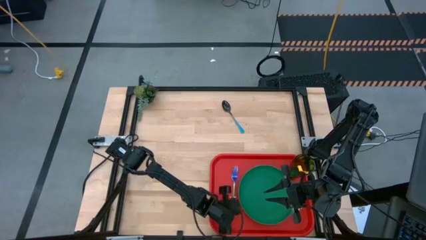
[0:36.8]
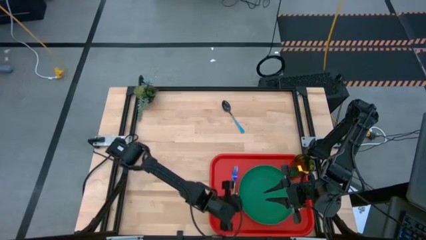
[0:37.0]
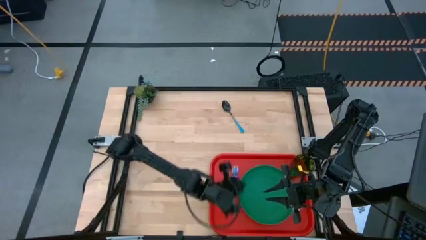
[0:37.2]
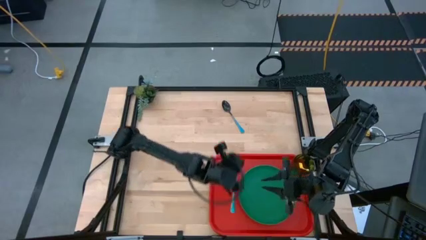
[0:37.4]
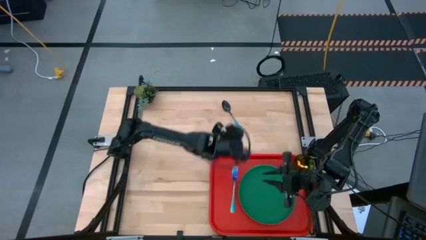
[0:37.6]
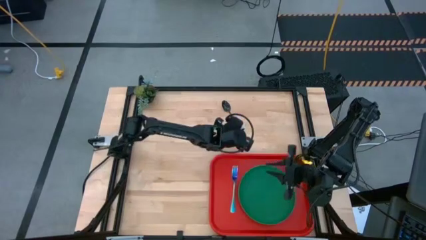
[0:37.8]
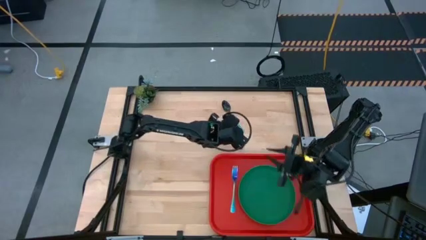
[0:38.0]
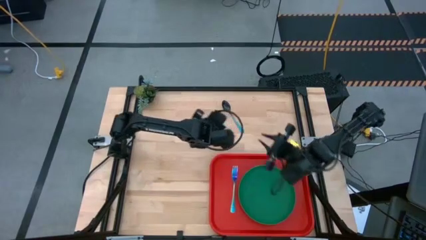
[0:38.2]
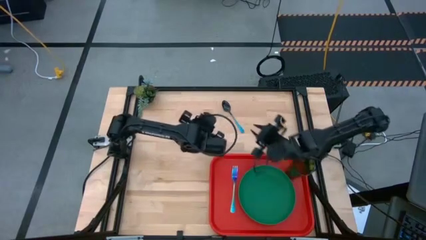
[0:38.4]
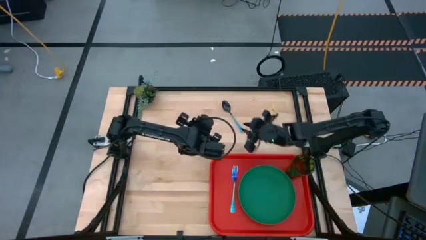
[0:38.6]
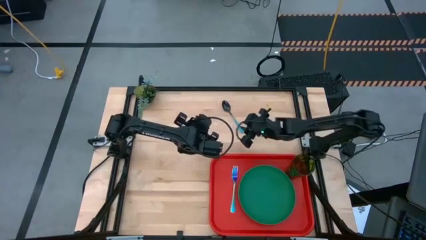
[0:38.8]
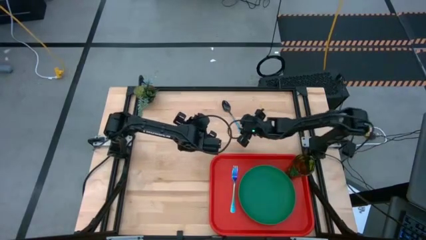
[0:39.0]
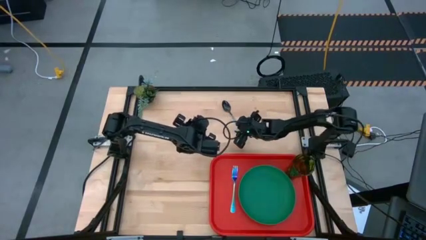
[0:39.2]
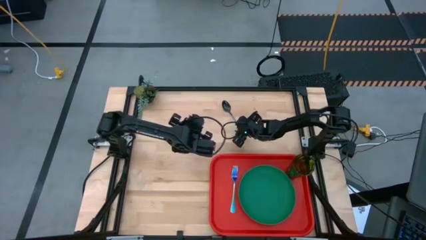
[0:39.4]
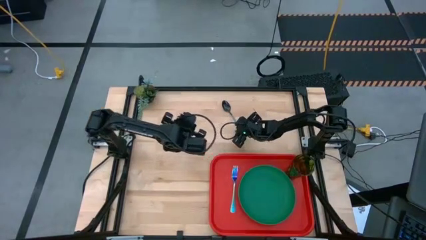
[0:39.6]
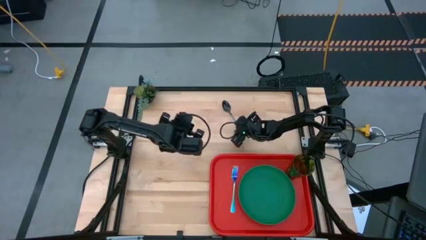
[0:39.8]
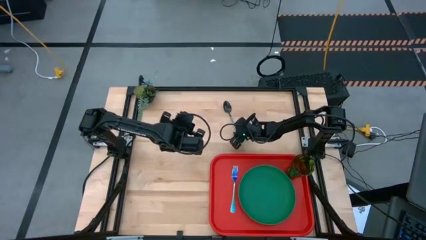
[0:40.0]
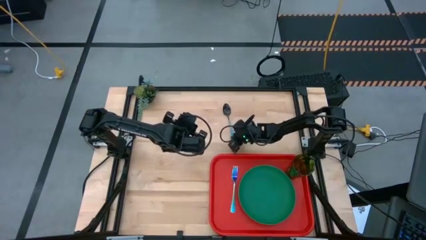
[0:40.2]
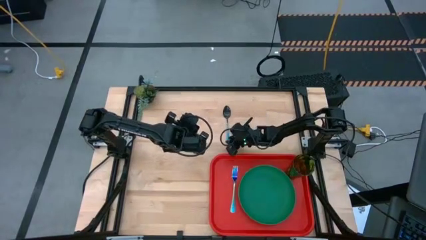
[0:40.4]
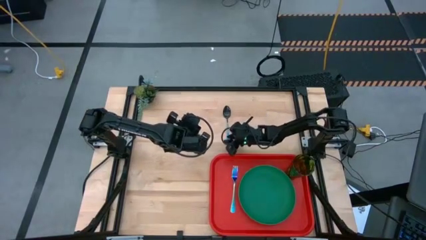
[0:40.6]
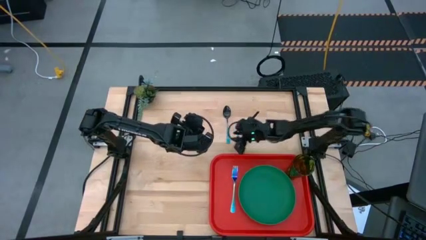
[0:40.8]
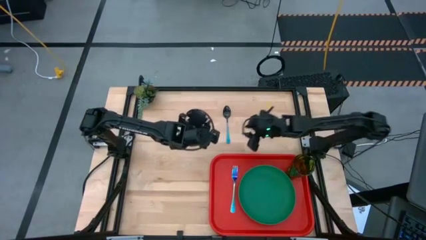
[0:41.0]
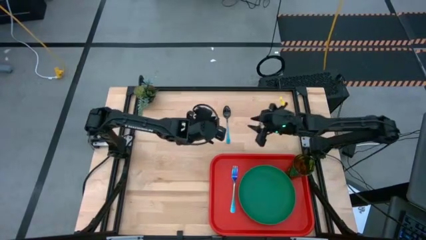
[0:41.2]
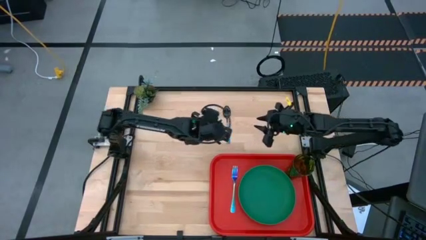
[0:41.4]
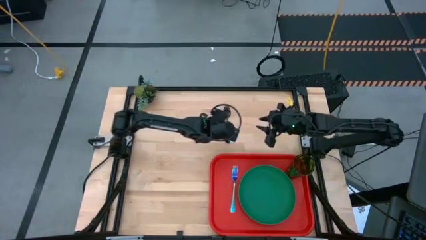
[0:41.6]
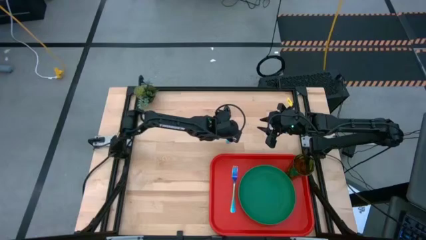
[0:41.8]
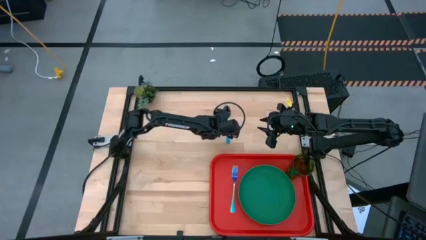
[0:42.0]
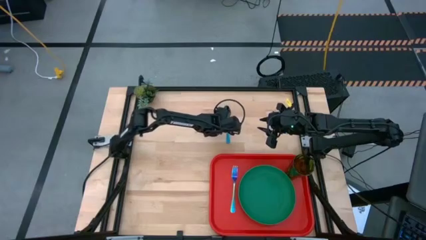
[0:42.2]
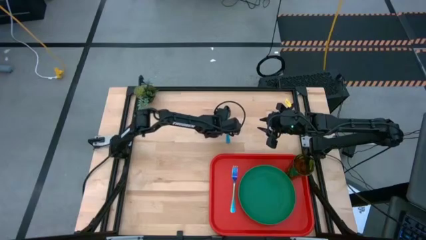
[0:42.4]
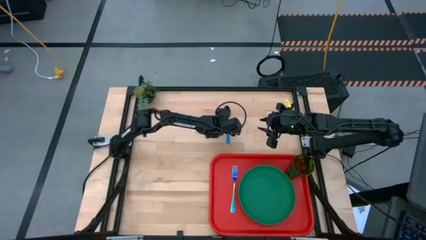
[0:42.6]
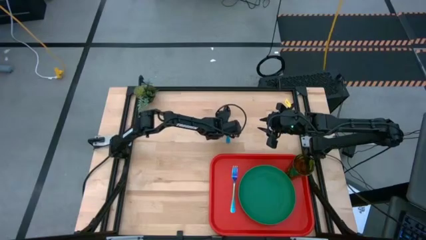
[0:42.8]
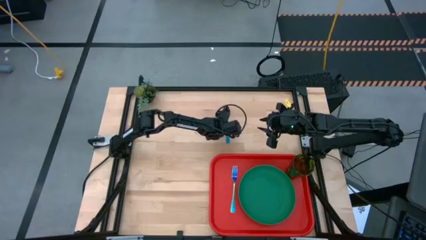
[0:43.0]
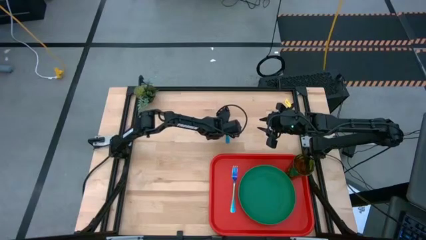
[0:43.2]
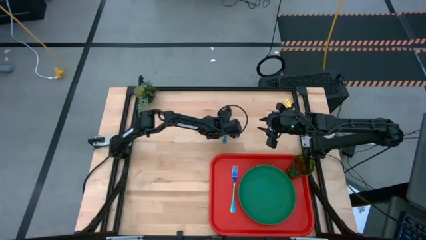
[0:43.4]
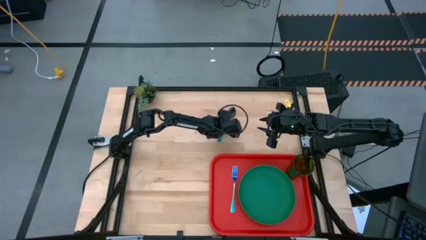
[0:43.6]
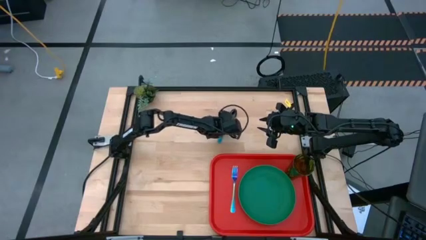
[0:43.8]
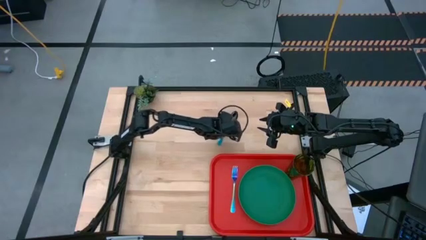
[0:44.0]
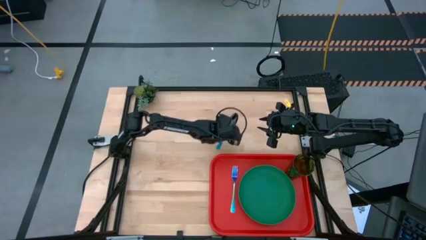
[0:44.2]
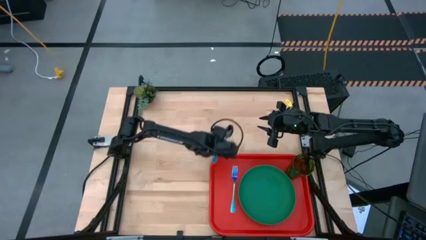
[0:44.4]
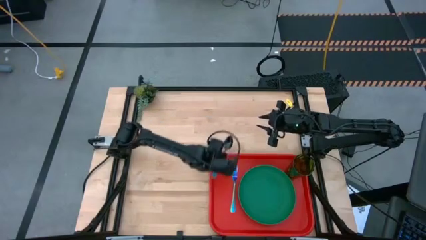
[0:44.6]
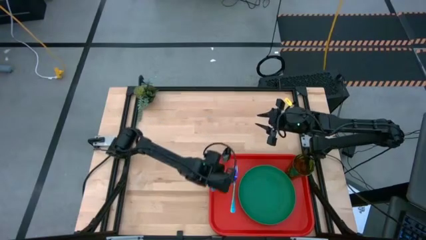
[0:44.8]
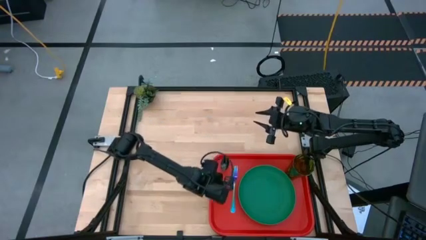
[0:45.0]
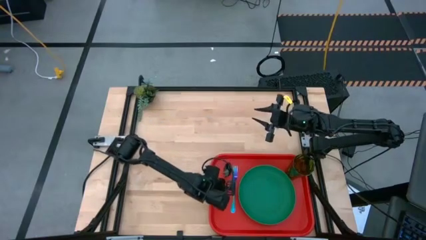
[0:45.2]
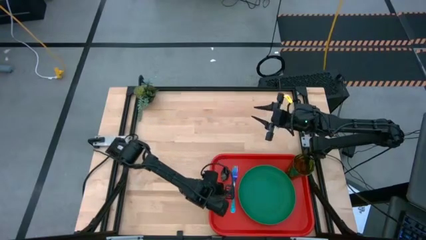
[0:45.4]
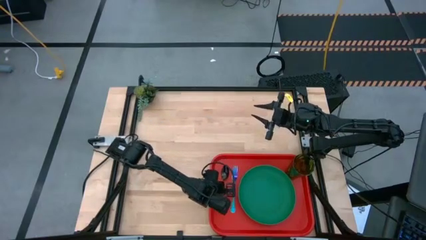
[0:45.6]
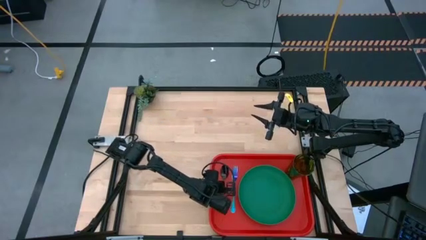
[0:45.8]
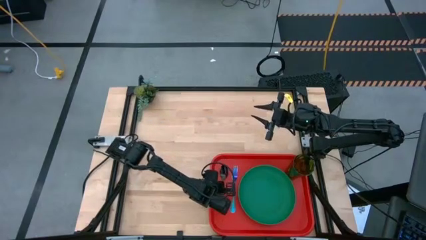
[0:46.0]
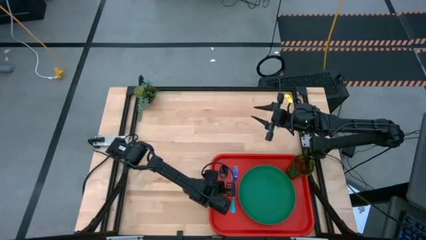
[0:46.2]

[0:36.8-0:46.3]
Task: Pick and place plate/cup/fork/spoon on tray
Put the blue spoon on the red tray to the left of the purple fork

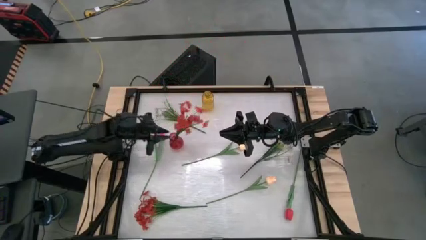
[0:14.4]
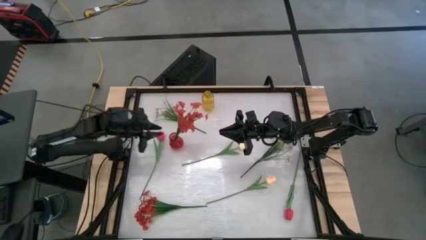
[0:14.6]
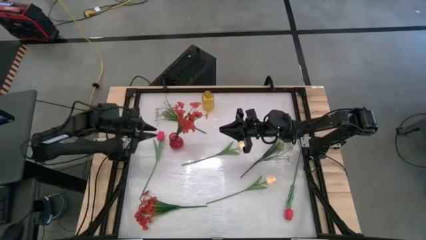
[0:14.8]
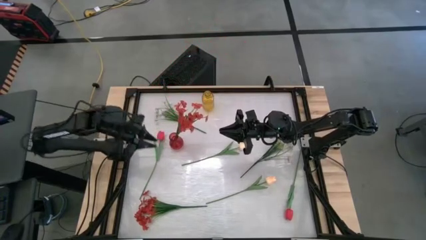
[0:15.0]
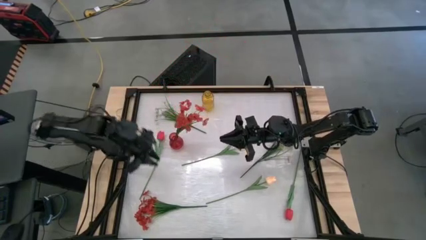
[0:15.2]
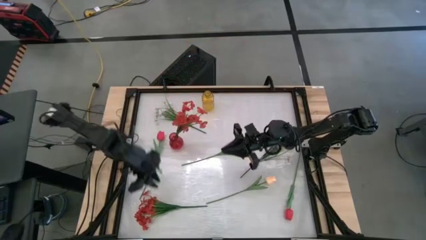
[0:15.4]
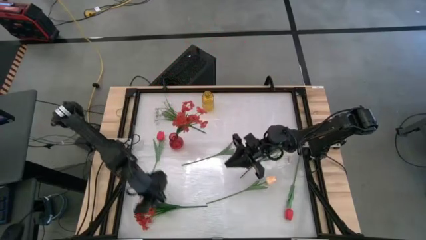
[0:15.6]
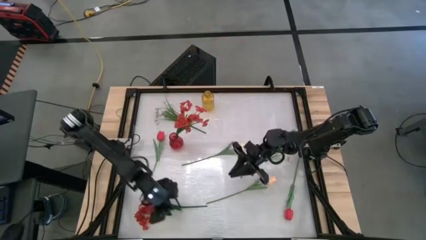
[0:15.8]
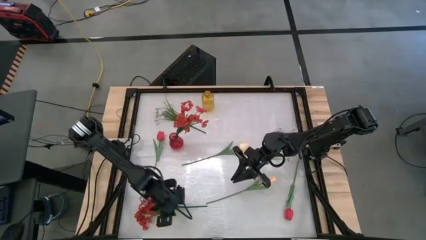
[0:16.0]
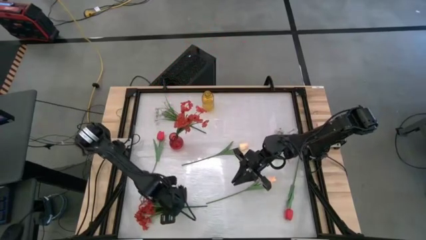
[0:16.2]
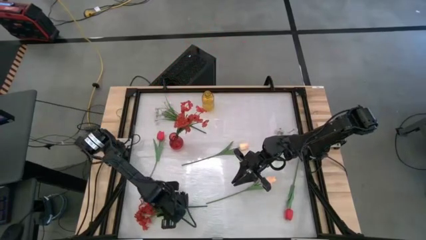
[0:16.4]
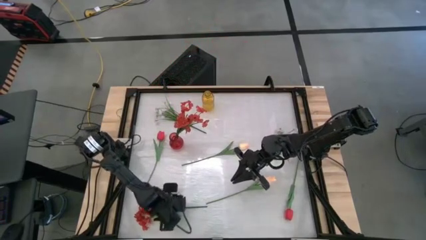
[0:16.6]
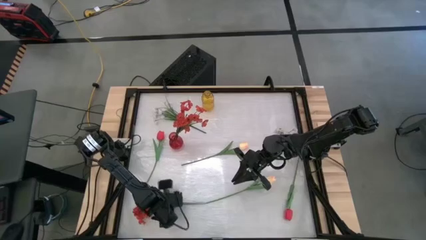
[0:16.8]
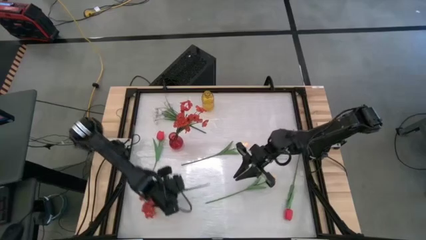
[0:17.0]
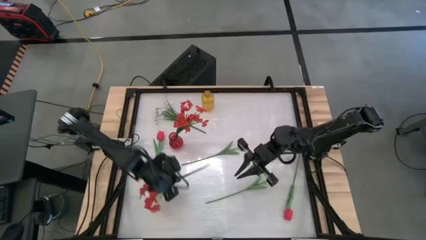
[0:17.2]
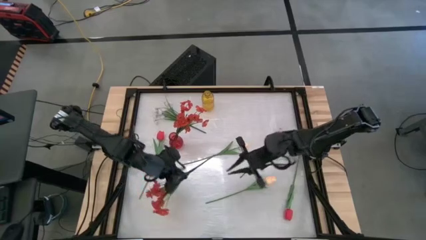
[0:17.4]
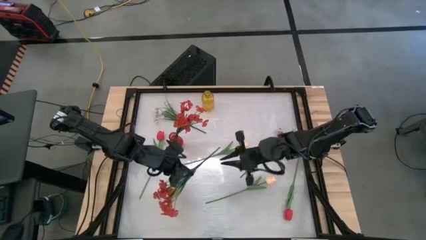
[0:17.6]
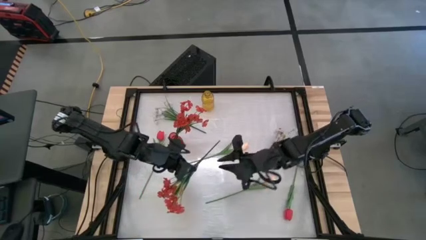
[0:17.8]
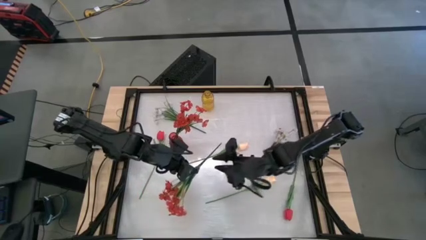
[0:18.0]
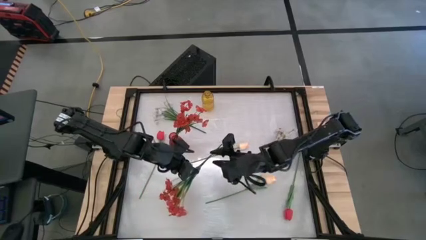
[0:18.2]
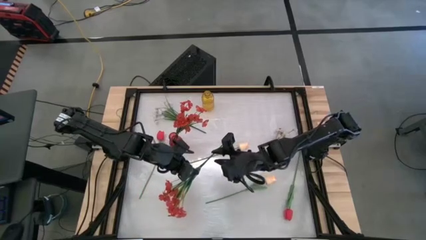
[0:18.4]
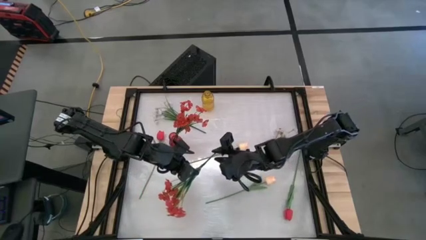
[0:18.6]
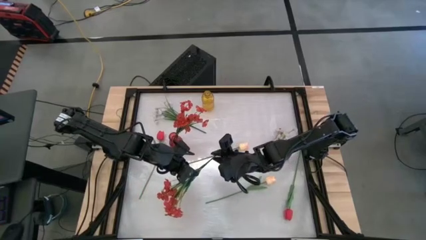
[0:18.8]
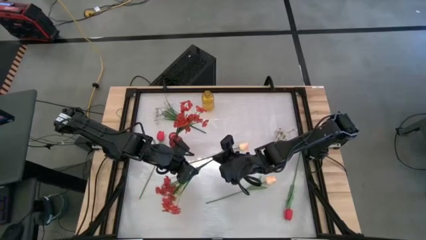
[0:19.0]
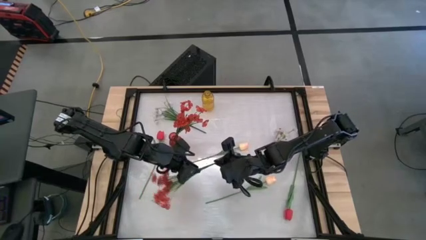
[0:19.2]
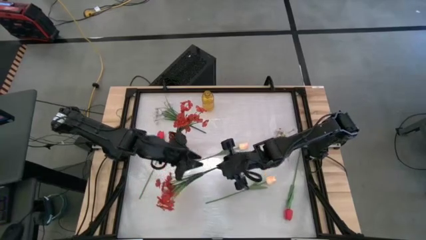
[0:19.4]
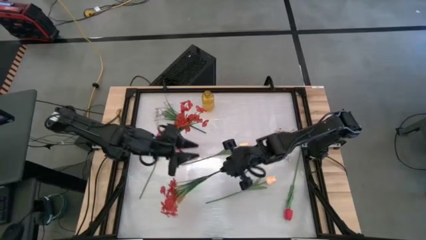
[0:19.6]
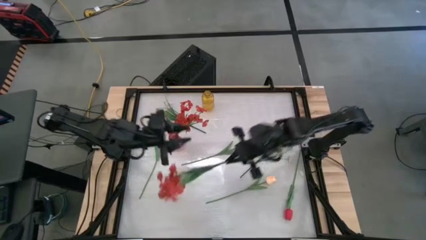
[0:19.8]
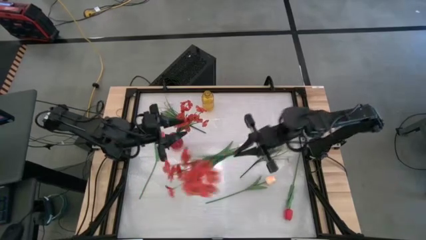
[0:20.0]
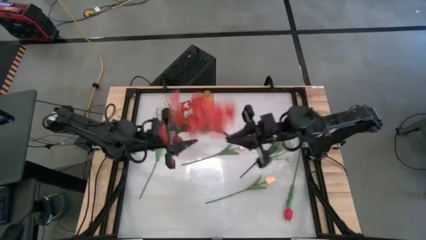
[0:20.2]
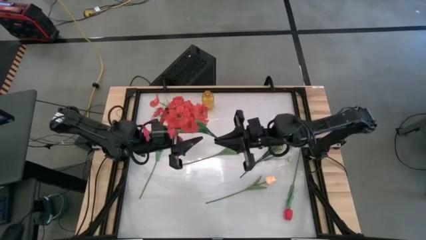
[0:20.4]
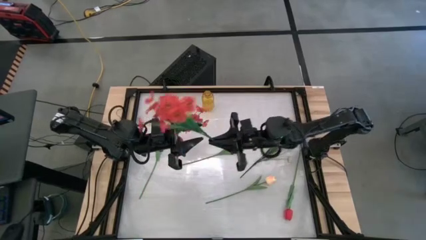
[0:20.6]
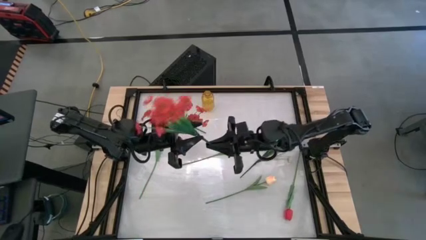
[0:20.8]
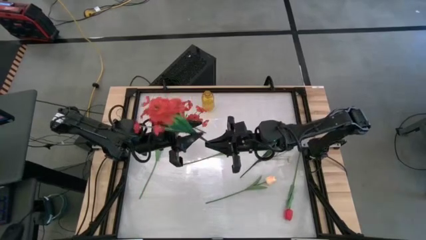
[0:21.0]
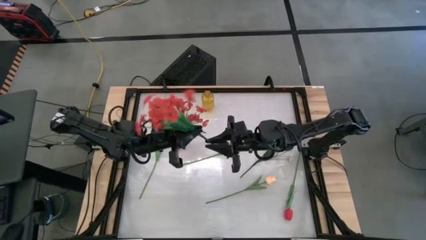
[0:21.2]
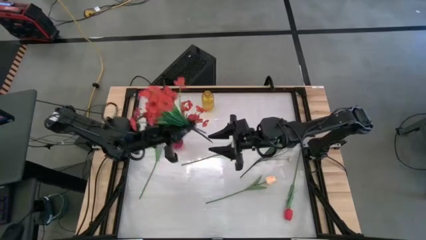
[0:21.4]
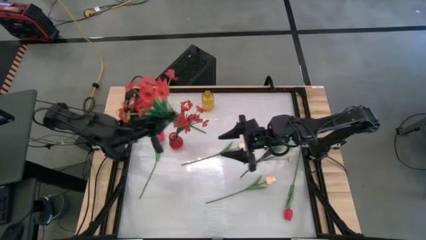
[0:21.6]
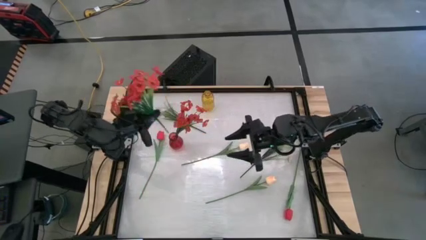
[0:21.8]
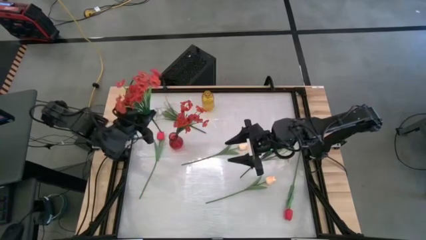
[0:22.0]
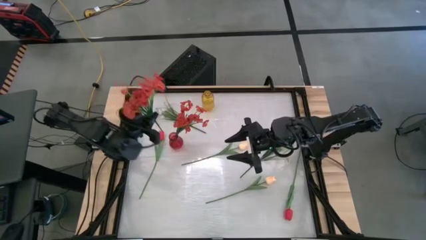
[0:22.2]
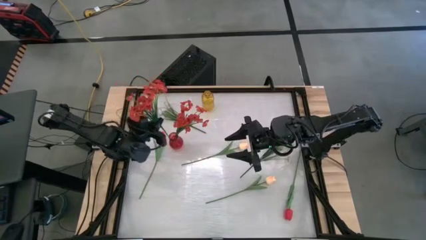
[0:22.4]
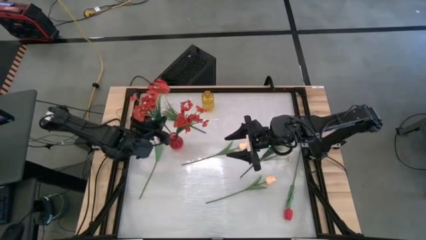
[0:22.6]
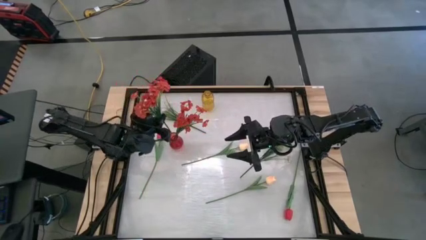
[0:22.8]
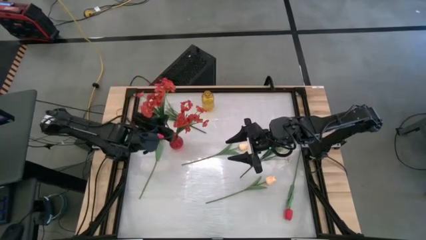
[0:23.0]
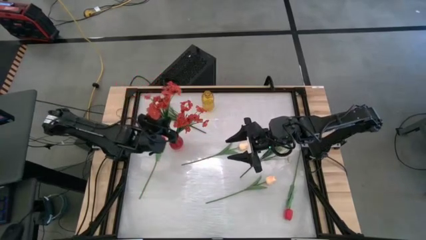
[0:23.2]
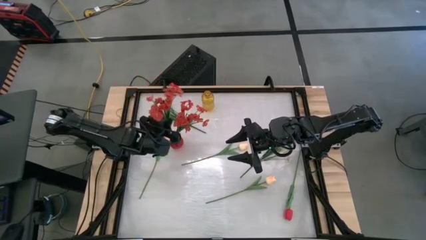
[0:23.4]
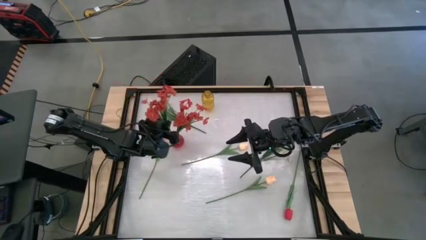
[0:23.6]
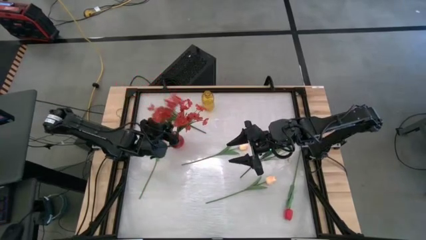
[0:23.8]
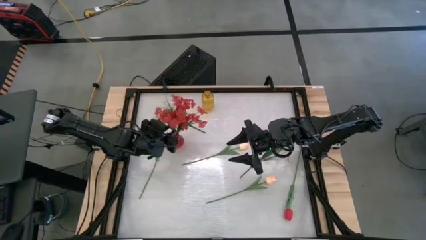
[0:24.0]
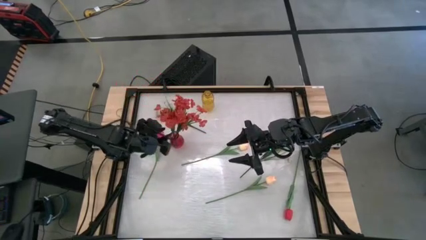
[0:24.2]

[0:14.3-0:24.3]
Task: Sort flowers into vase by color
Put the red flowers into the red flower vase
